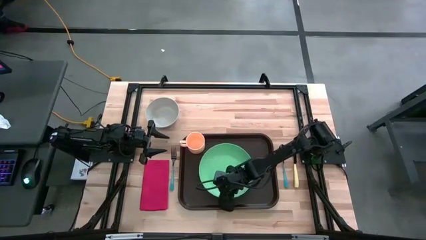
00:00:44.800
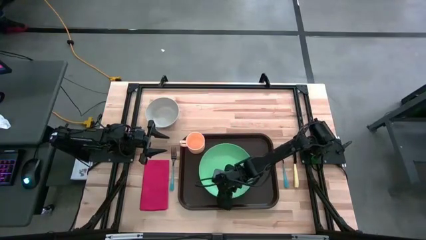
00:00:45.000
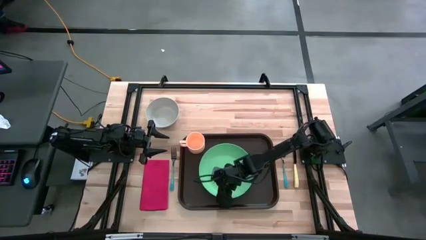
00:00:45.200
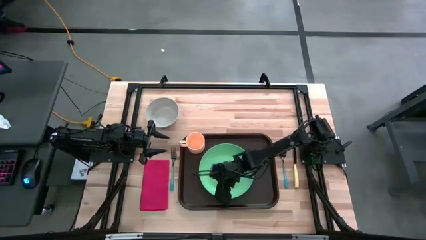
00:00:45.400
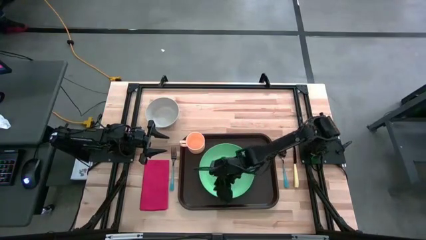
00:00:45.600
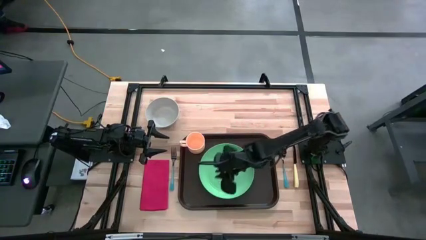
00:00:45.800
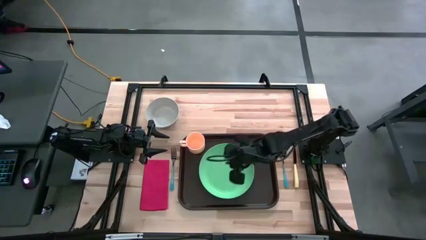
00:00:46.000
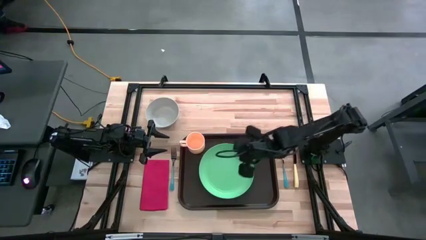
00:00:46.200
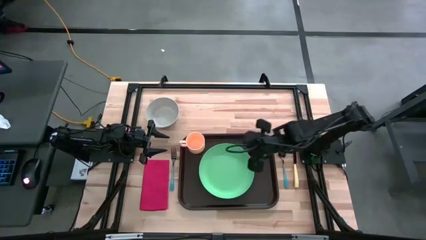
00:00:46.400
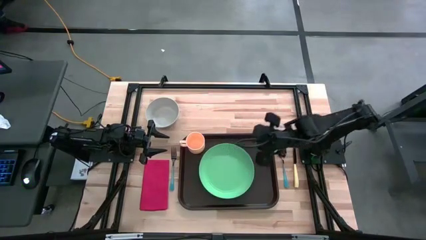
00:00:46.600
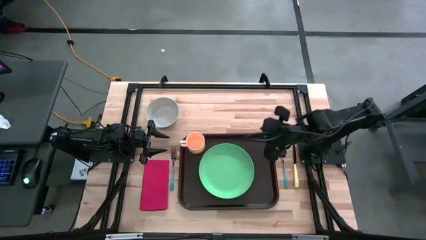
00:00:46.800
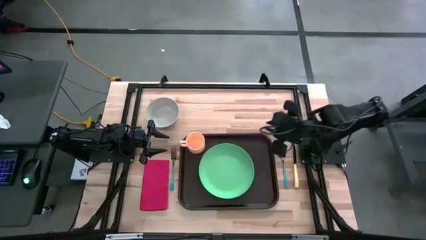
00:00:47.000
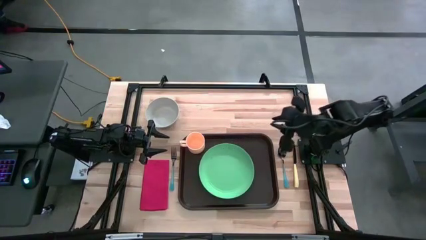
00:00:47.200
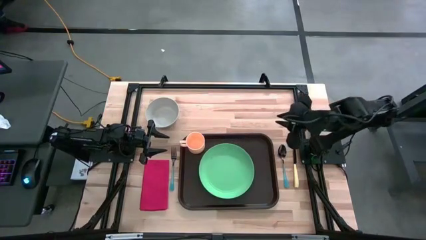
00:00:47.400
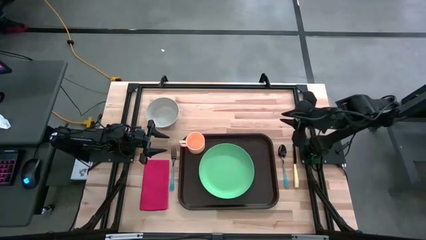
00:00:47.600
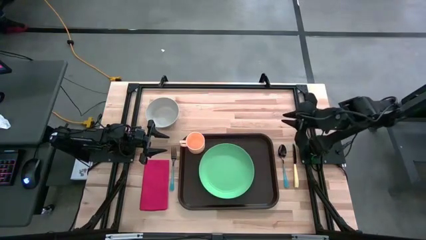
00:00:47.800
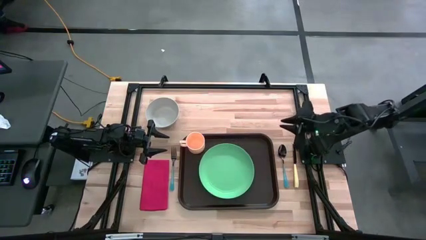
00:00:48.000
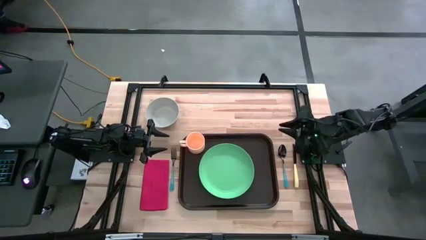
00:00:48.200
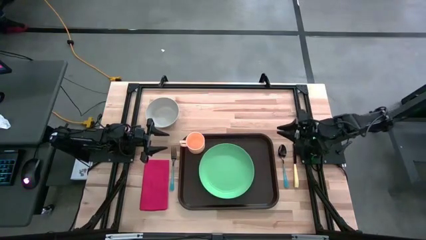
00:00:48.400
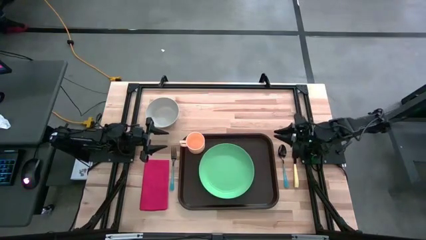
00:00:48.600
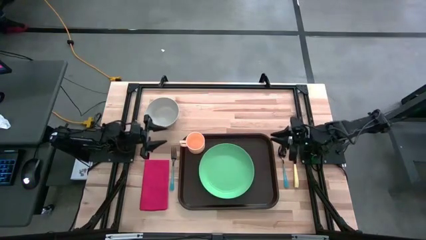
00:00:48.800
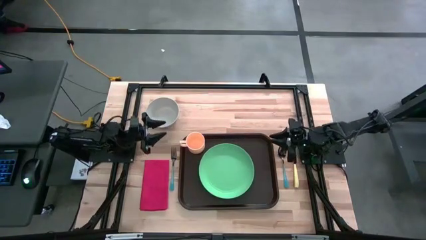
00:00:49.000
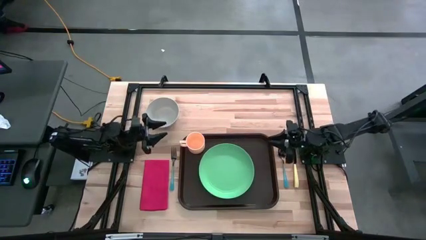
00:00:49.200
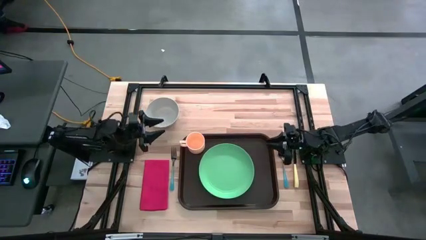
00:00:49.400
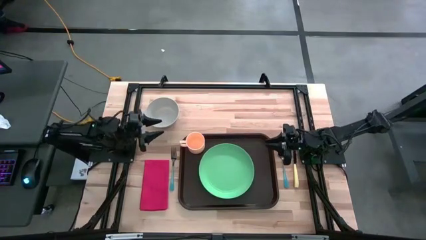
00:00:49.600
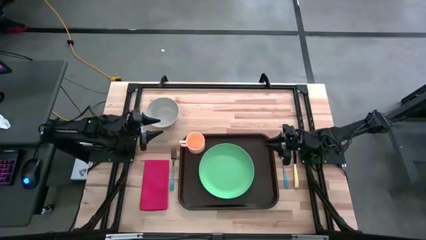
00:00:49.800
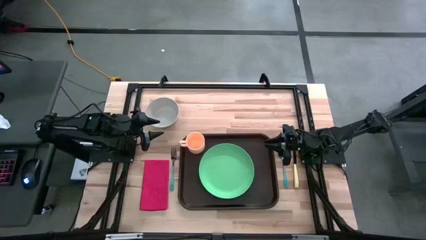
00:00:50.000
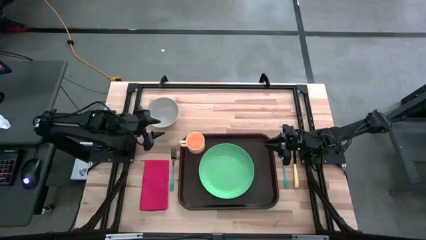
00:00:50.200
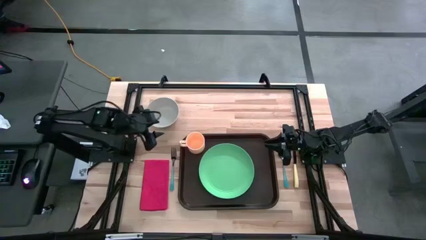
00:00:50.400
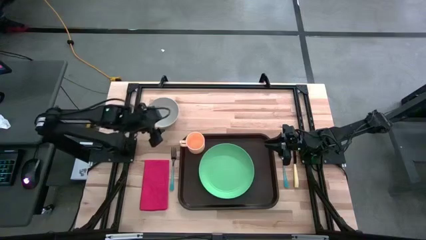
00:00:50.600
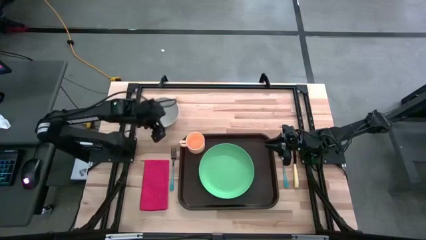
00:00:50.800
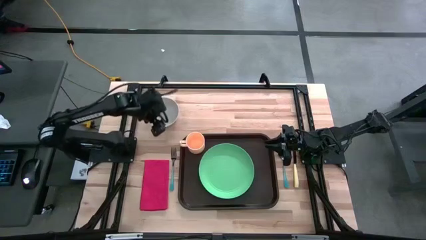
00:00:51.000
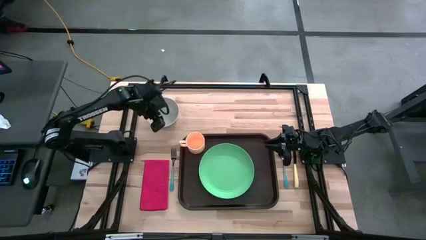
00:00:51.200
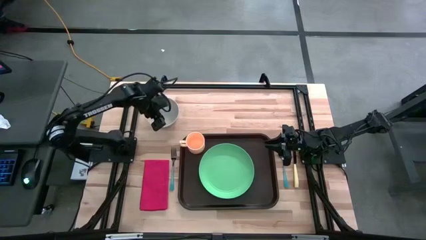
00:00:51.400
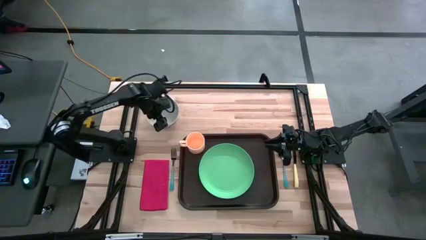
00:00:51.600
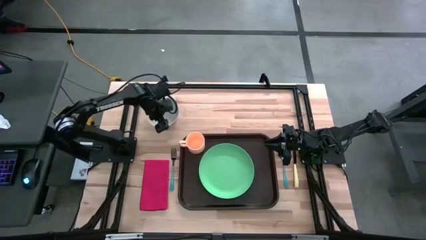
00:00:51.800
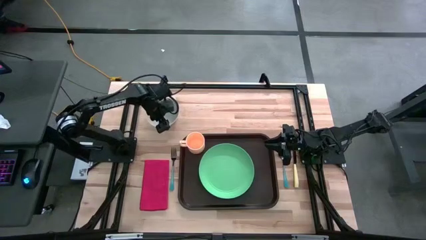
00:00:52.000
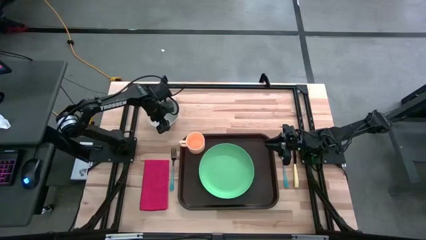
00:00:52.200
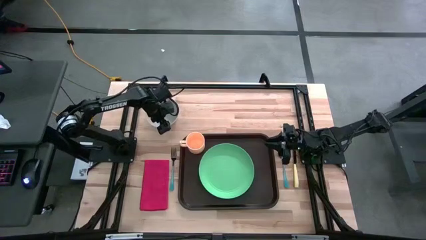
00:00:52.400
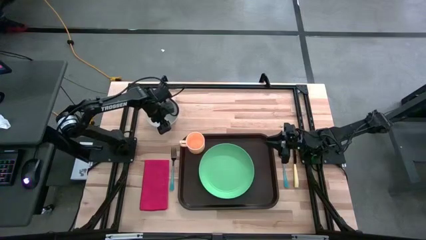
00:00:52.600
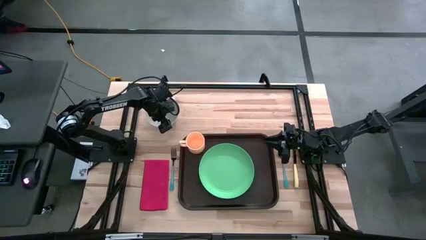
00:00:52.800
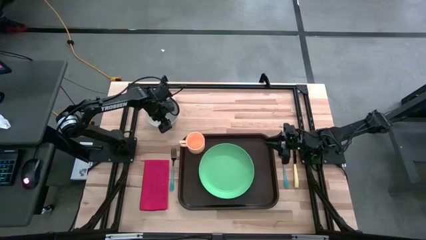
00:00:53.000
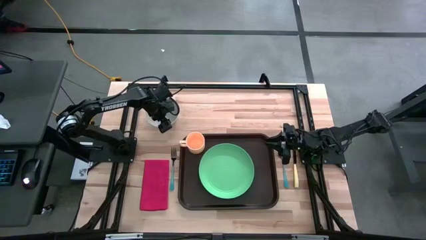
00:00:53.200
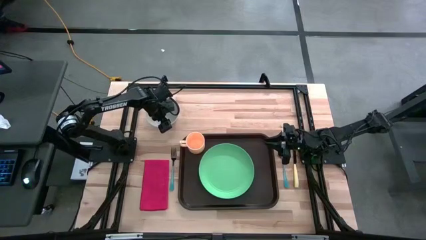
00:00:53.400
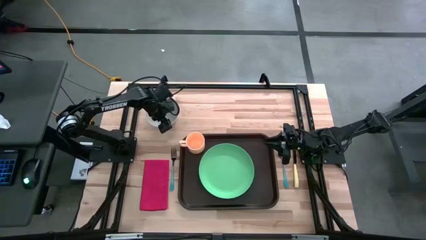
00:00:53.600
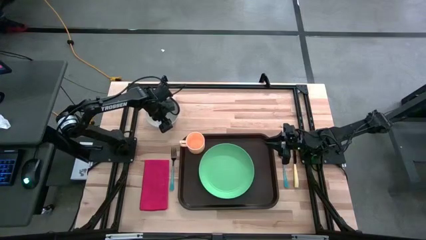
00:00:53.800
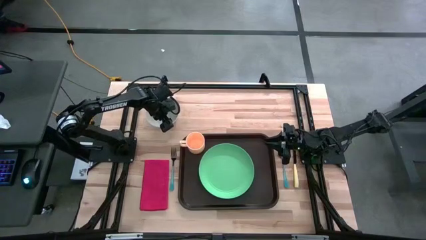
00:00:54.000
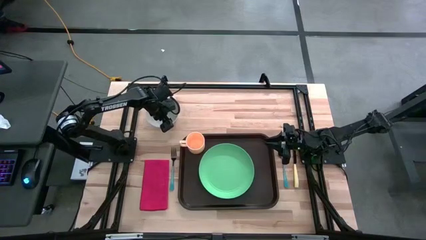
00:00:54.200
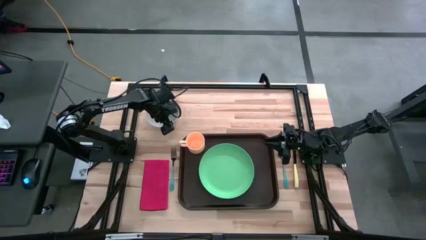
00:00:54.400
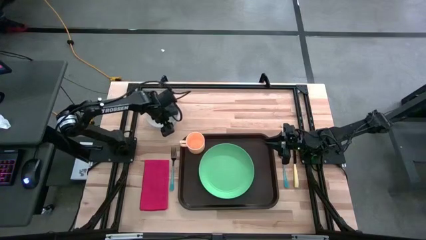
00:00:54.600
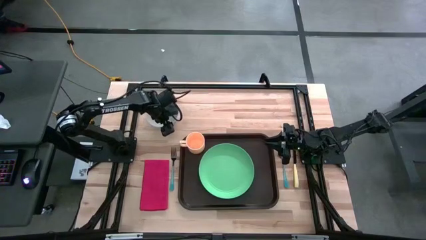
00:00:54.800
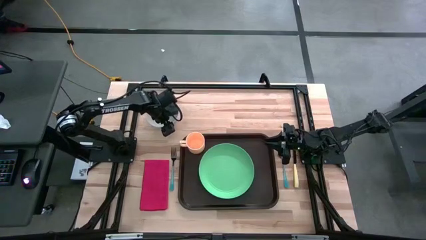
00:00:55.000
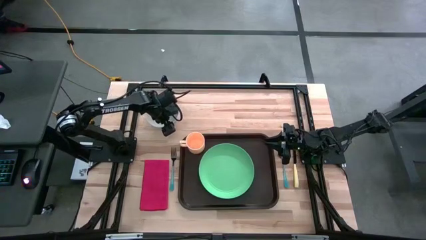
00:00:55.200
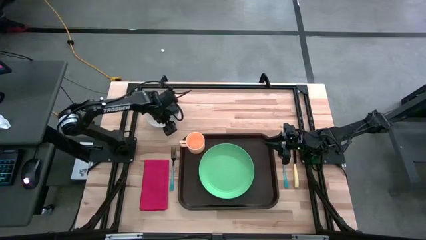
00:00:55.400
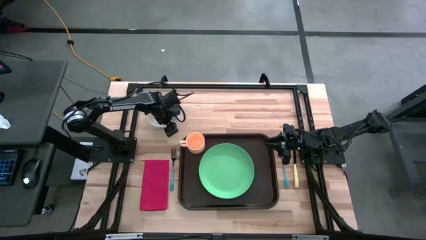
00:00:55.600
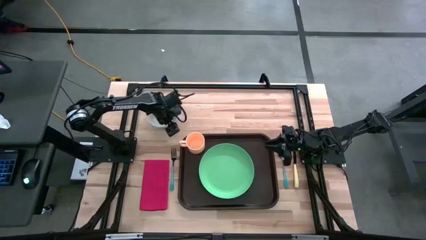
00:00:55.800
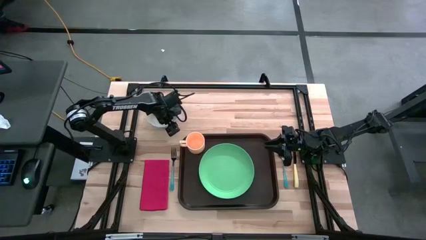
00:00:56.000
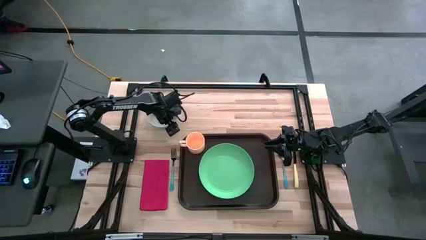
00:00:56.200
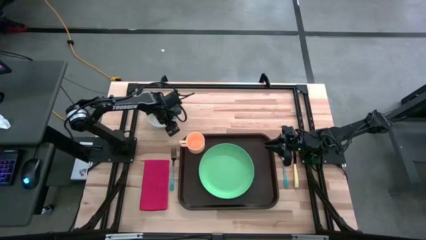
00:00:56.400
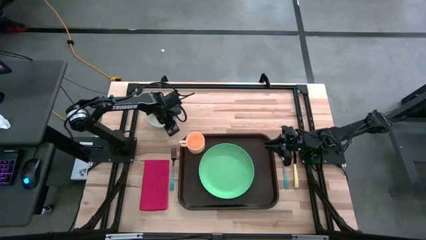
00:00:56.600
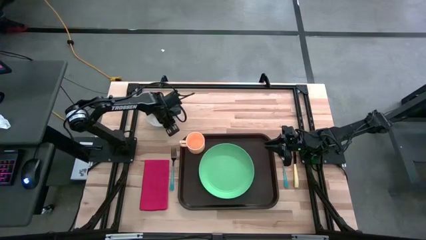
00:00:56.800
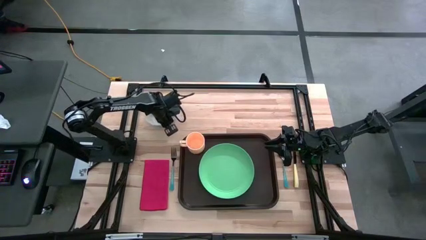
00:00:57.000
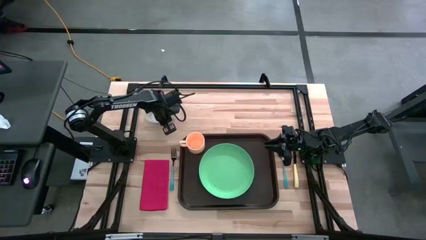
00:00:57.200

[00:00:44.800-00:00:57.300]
Task: Set up tray
Put the gray bowl on top of the green plate on the brown serving tray

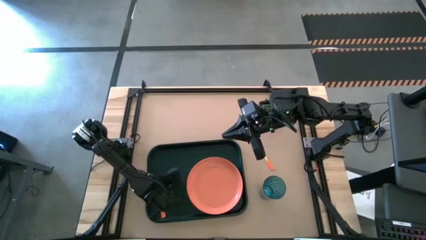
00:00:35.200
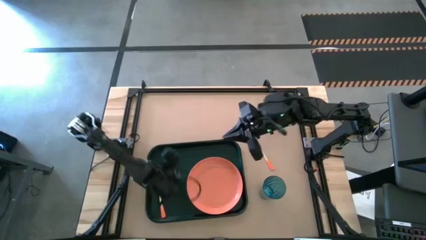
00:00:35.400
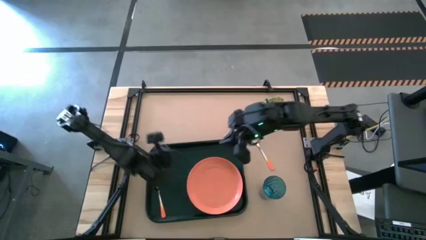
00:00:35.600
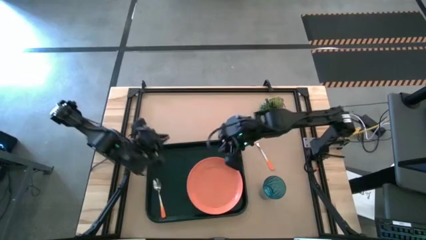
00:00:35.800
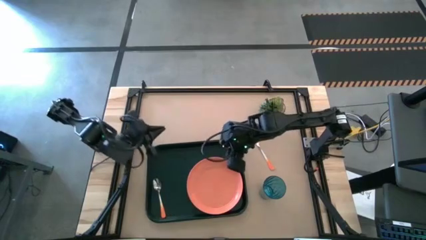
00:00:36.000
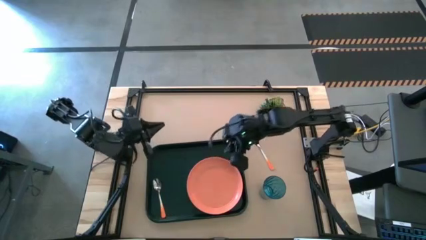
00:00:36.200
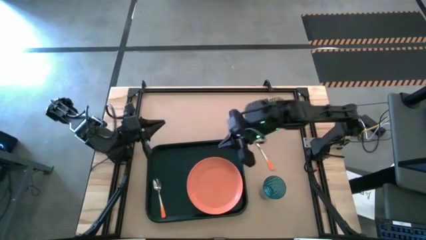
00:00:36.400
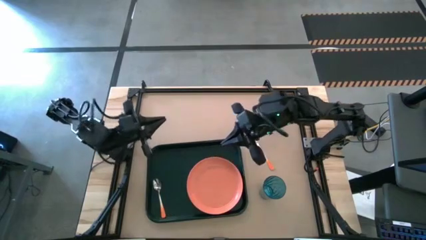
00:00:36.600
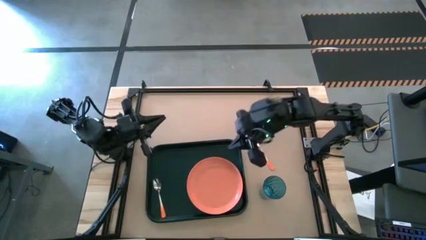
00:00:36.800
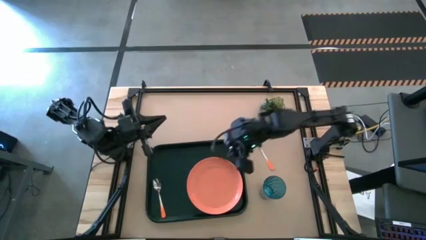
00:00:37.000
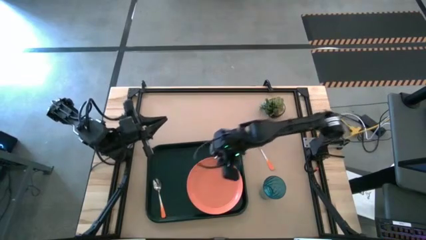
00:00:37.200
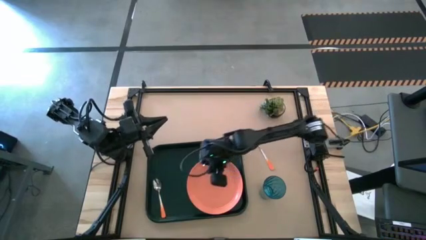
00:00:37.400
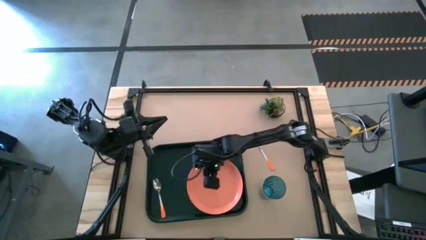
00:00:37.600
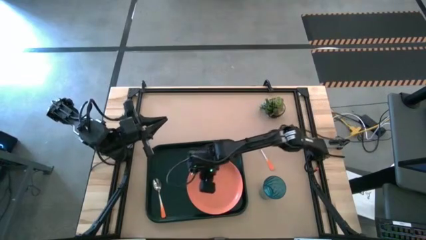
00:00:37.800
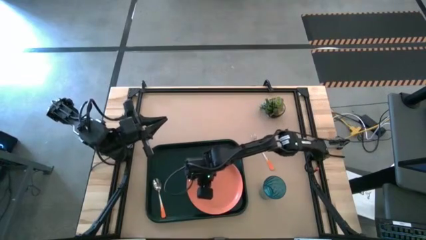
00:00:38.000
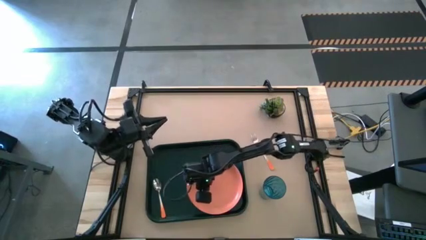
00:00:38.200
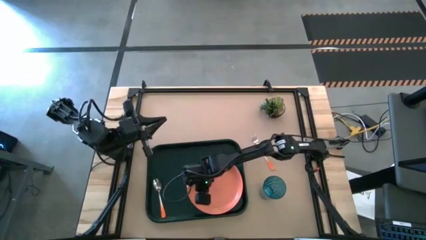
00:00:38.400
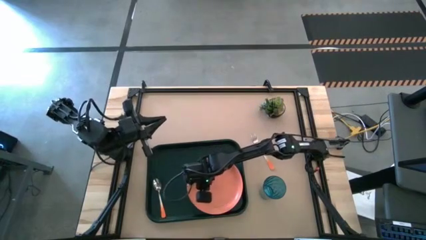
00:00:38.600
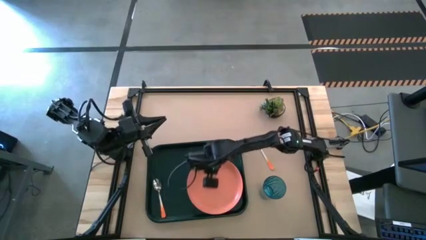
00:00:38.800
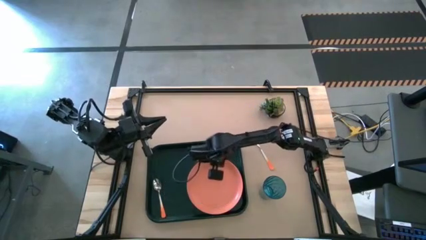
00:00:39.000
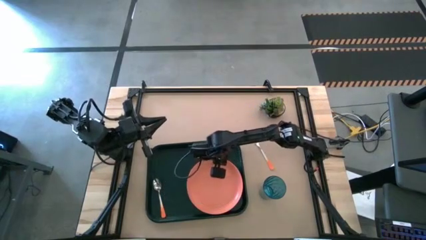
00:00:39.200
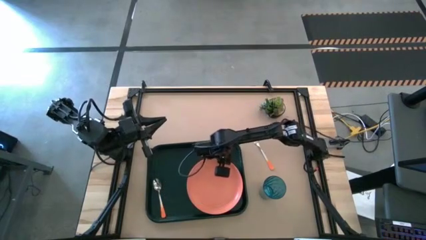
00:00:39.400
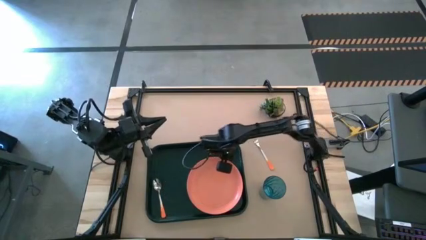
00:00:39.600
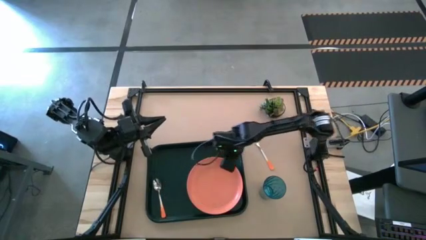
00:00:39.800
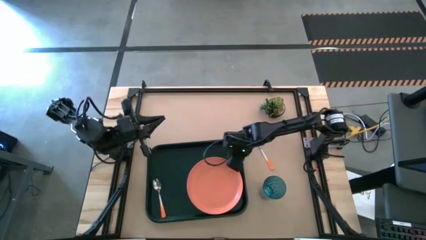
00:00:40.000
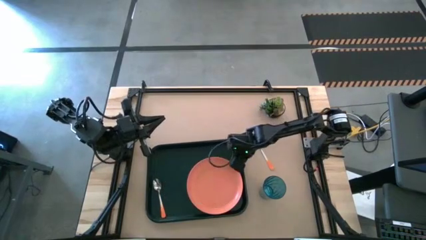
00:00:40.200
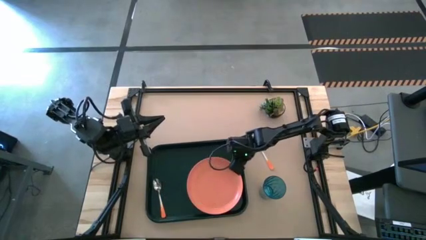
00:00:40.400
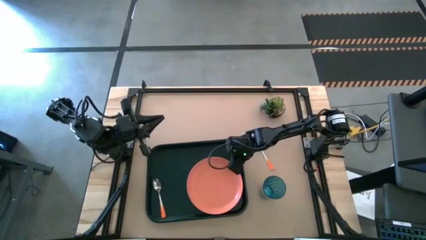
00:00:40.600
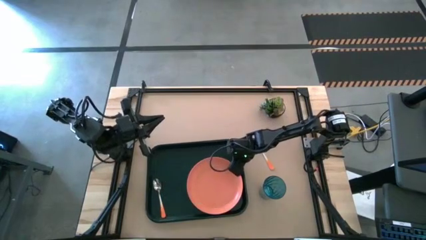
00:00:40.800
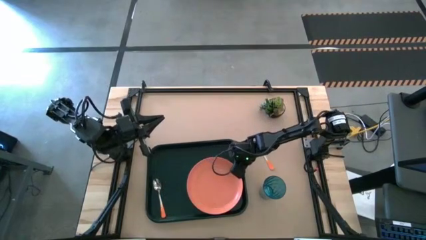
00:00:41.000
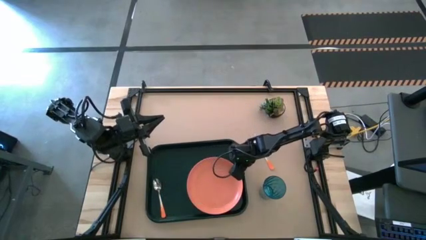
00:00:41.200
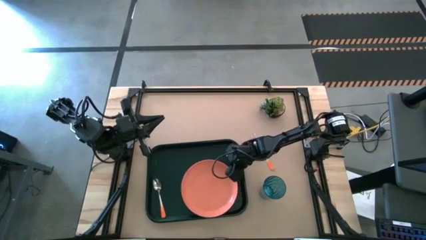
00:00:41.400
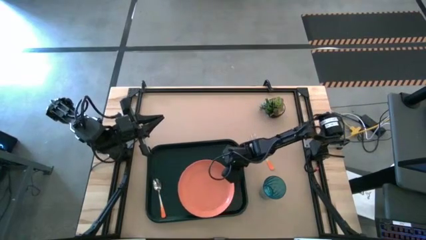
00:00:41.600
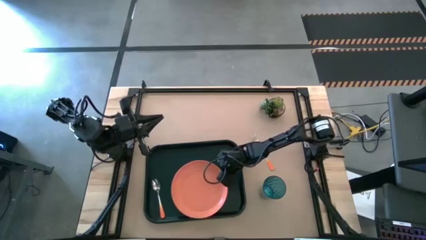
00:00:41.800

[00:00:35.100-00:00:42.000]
Task: Pick and place plate/cup/fork/spoon on tray
Adjust the light red plate on the dark green tray
